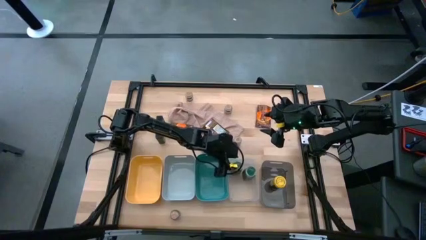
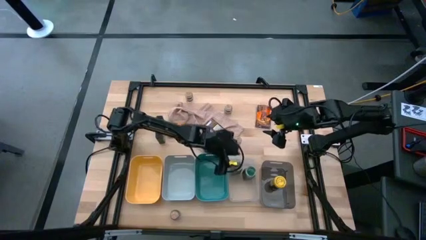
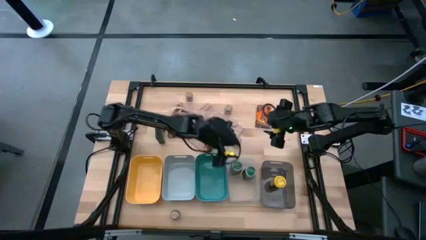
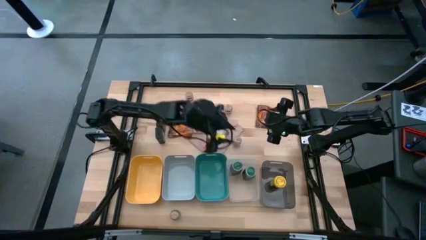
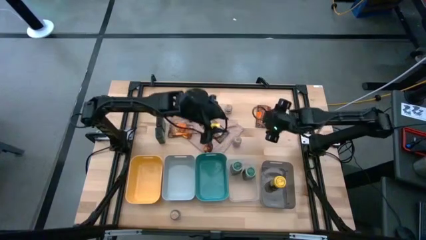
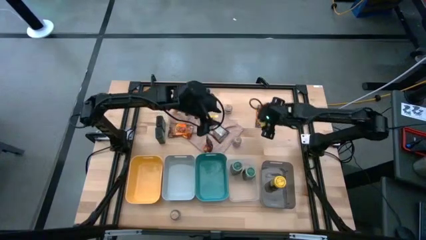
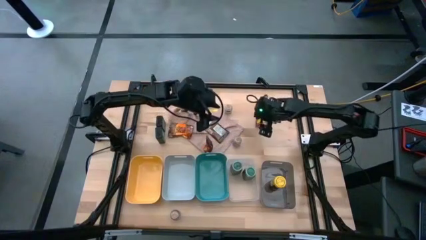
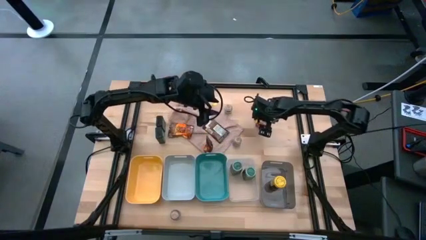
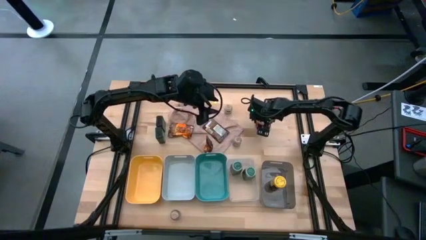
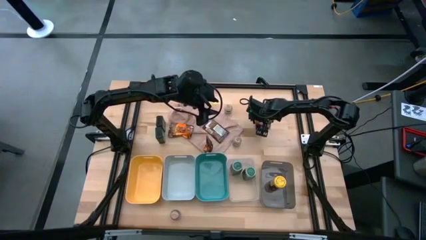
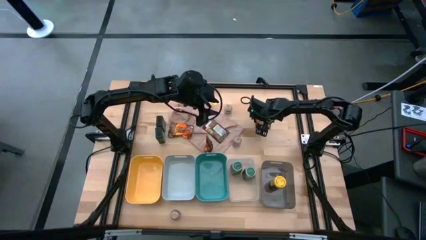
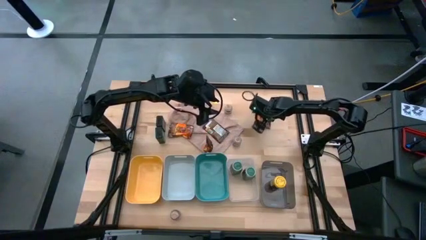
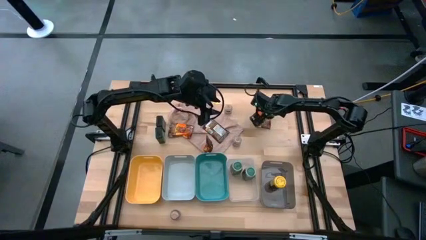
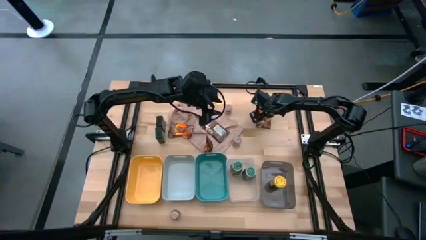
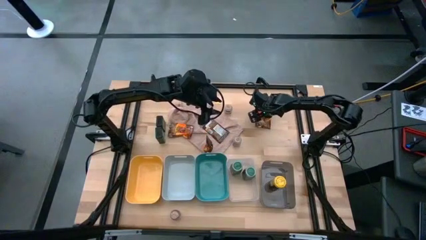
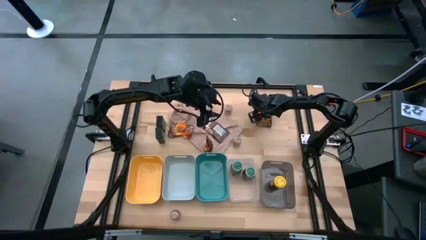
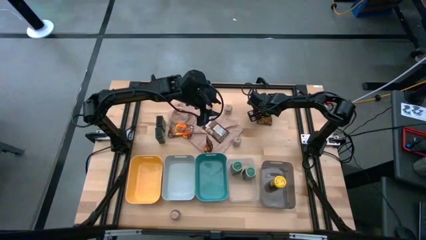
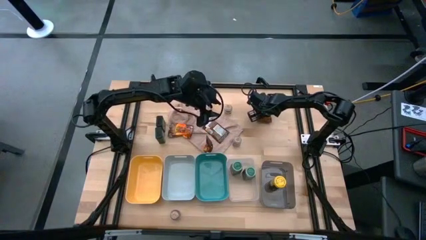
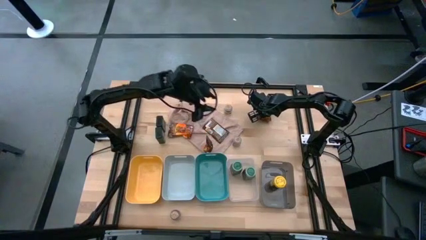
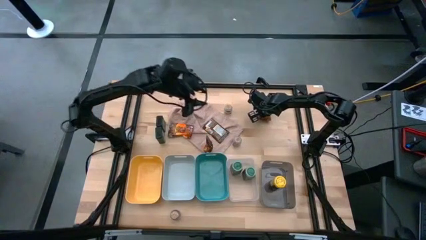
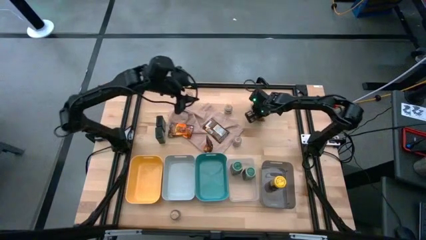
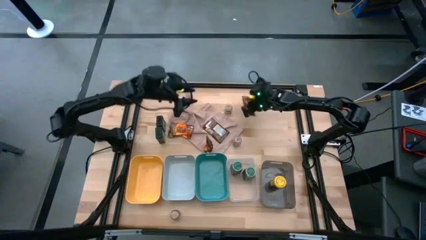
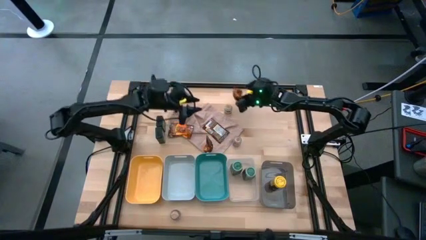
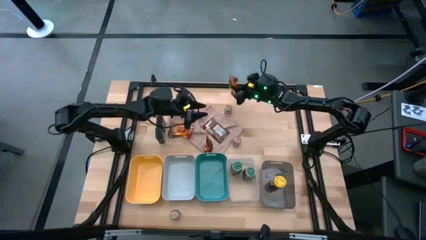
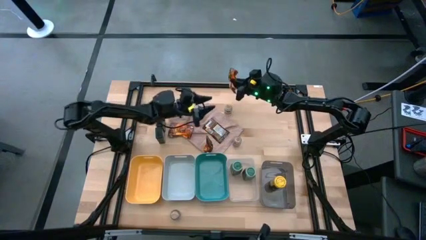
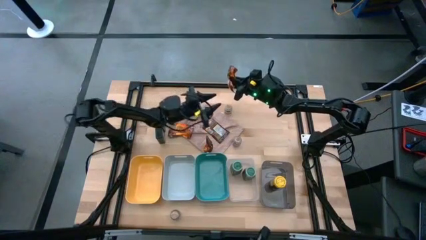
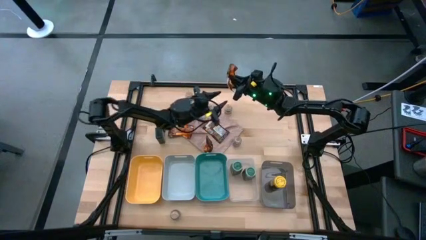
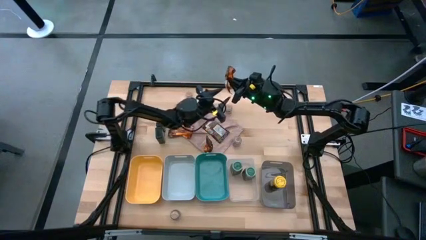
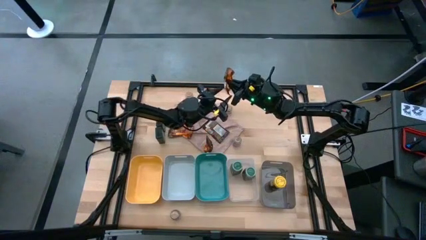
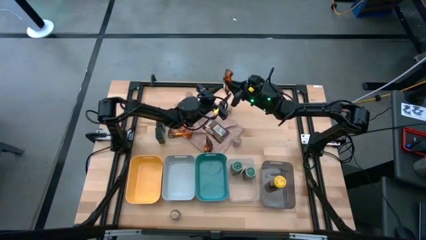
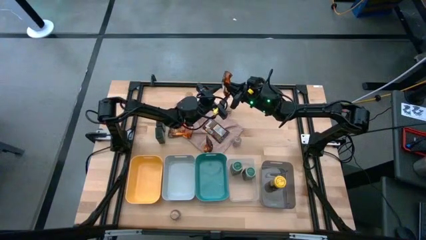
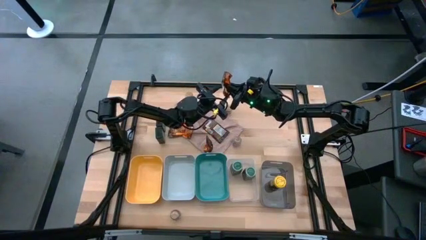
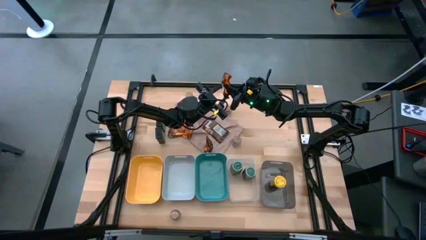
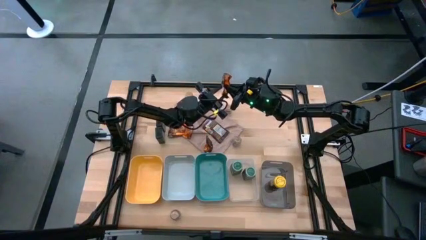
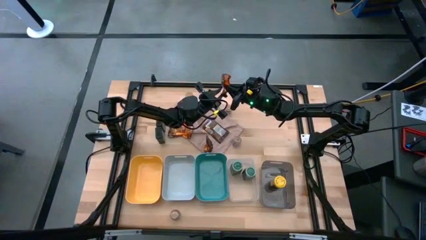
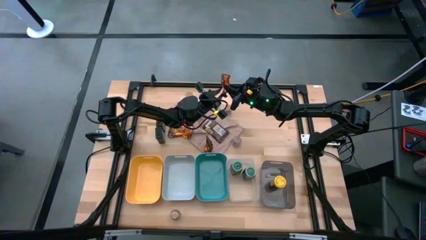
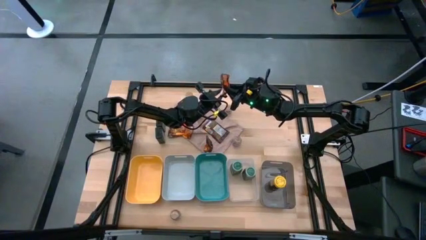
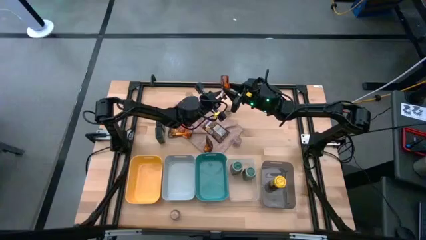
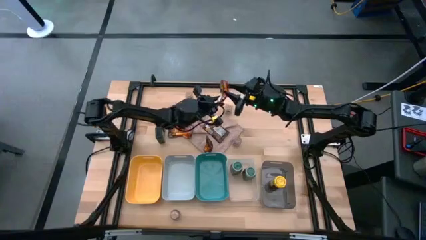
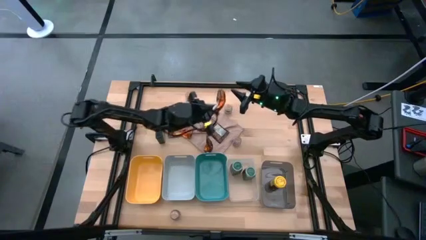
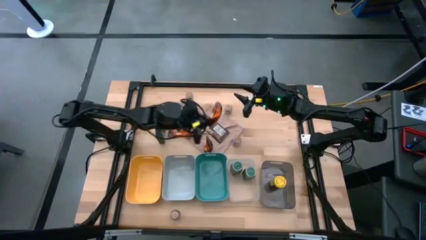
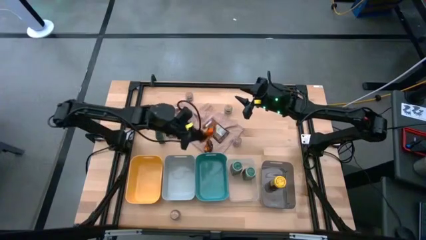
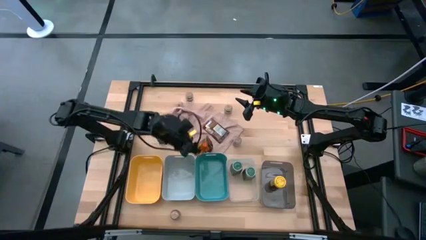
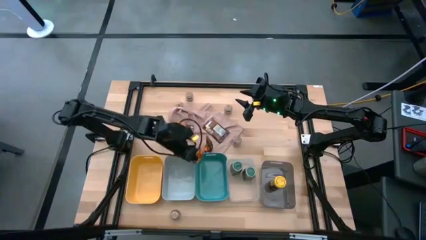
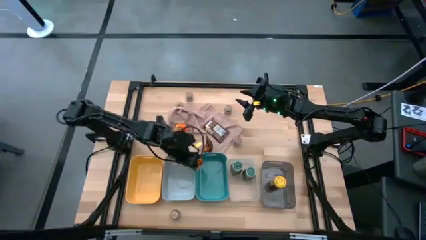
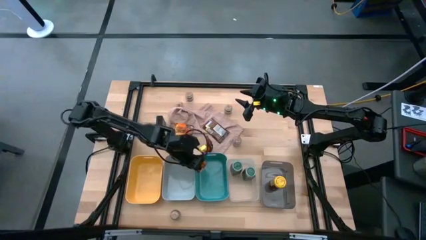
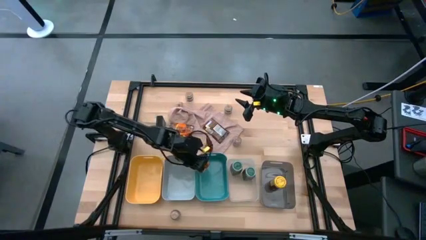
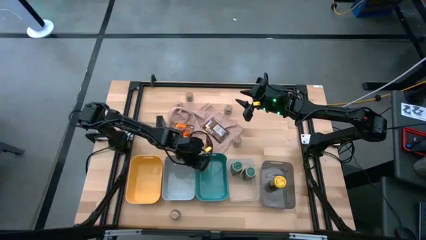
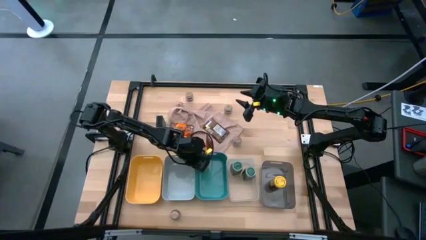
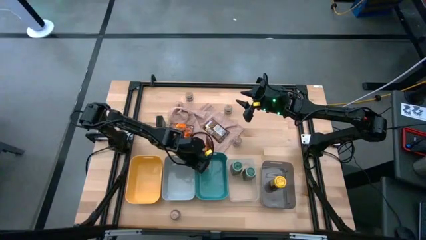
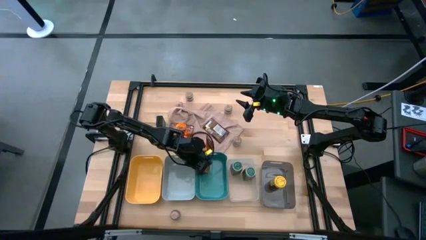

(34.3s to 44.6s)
Task: Sort spices by type
Put the orange seasoning bag into the green bin

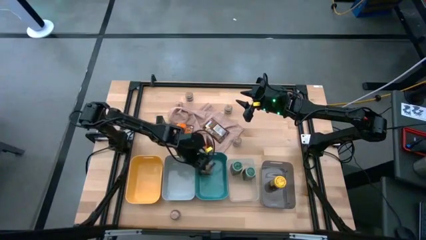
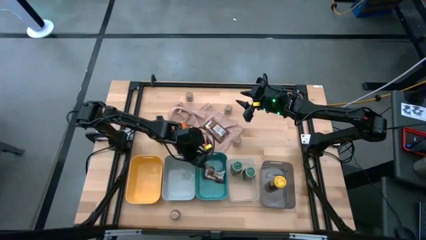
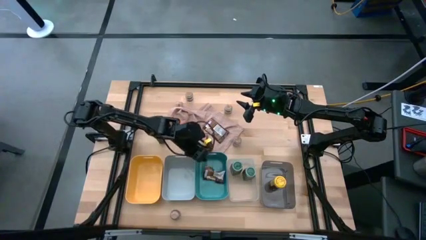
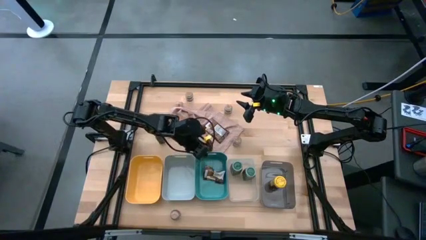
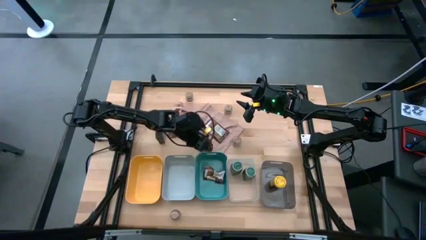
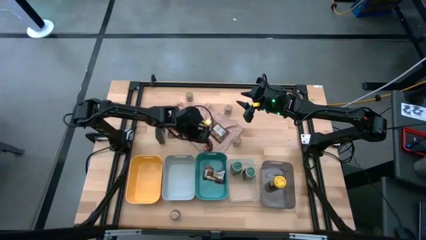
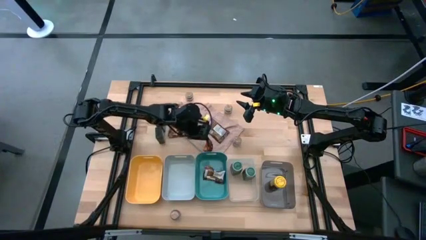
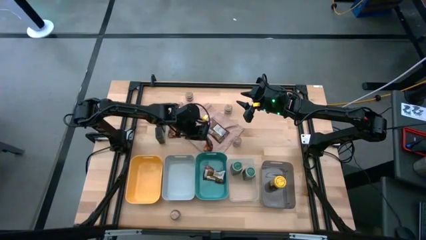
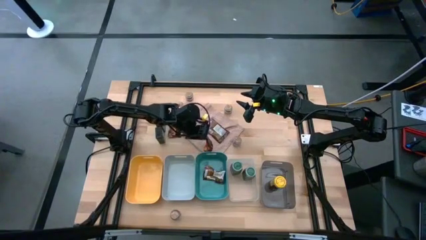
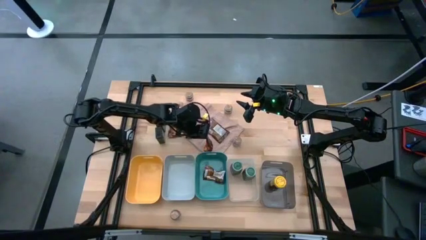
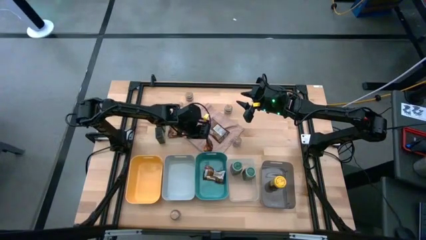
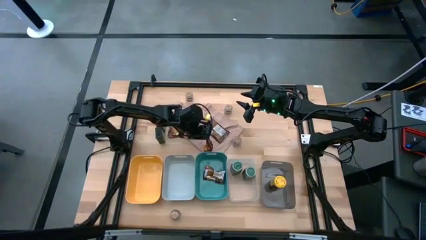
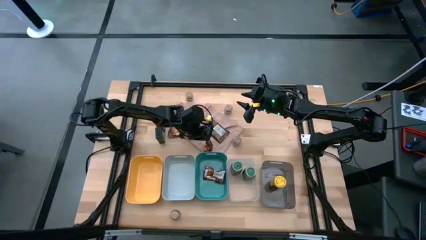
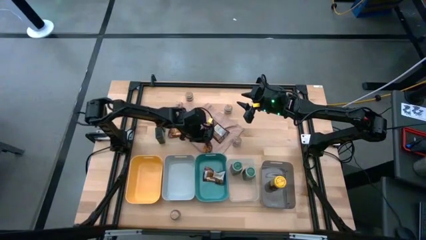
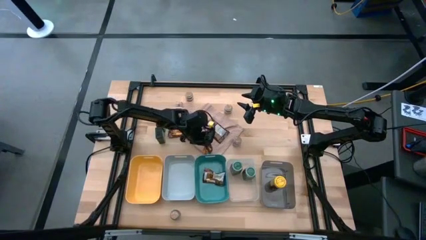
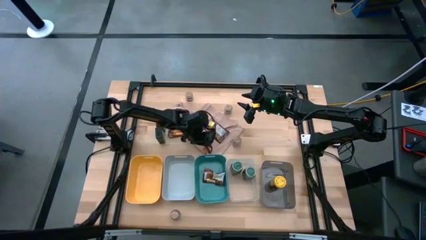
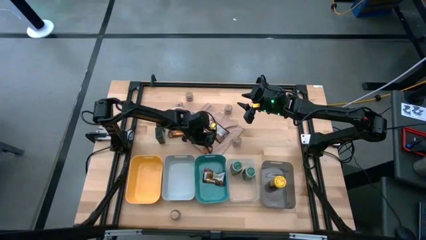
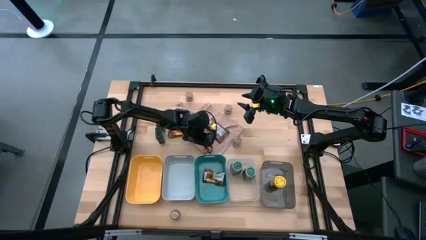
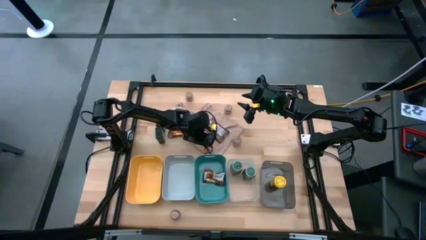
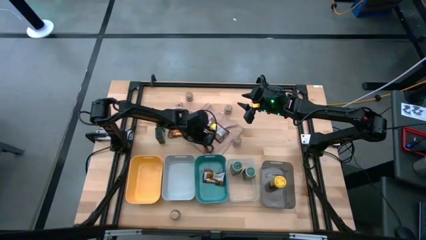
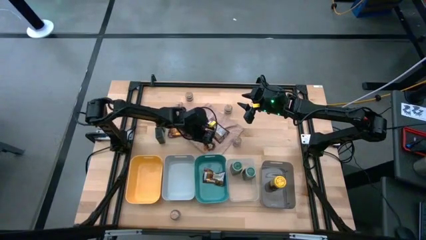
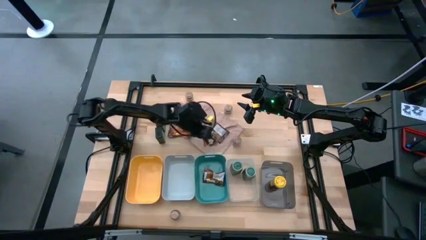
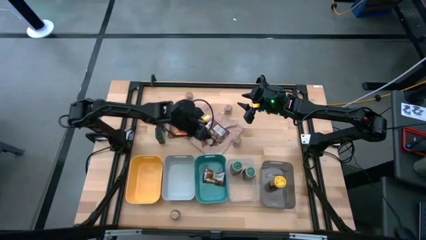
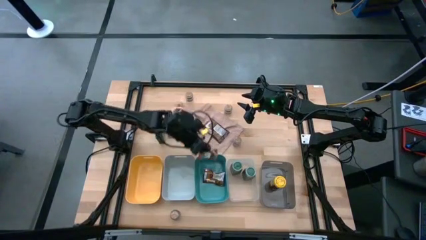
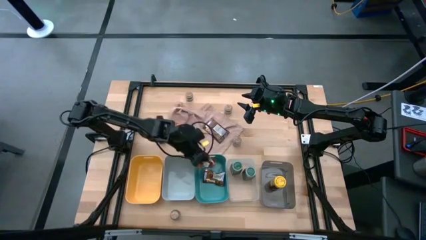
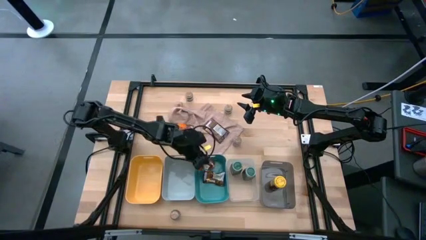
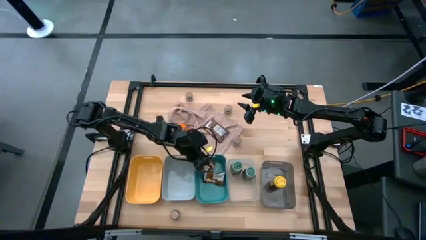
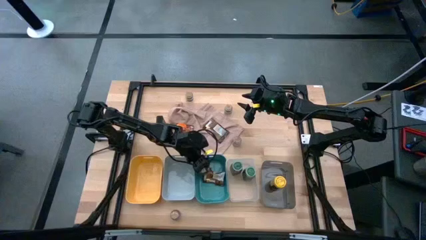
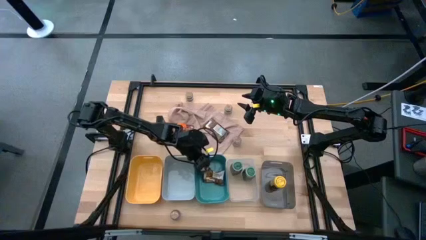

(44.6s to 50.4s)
Put the orange seasoning bag into the green bin
